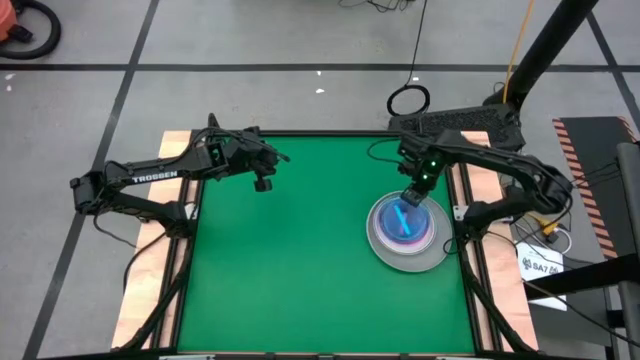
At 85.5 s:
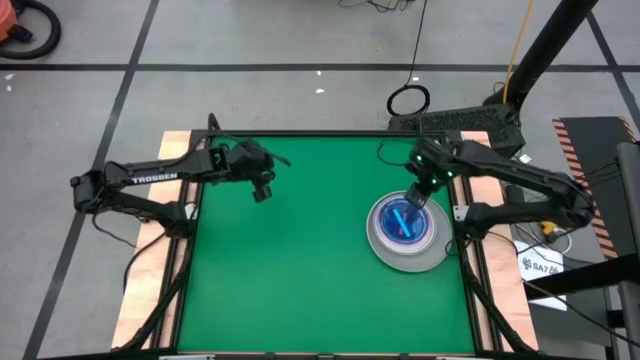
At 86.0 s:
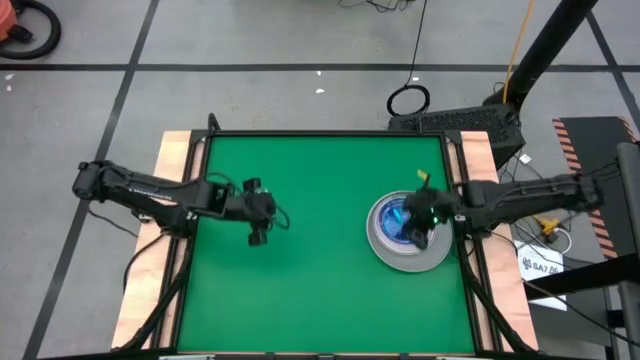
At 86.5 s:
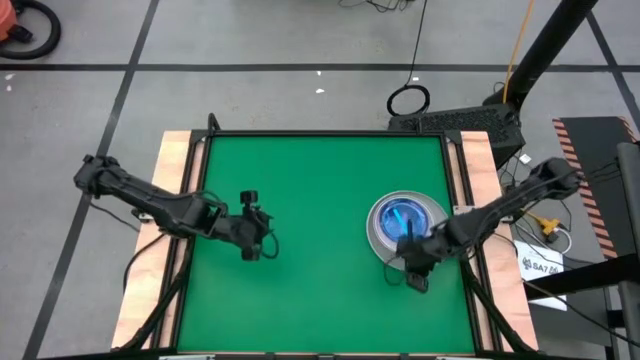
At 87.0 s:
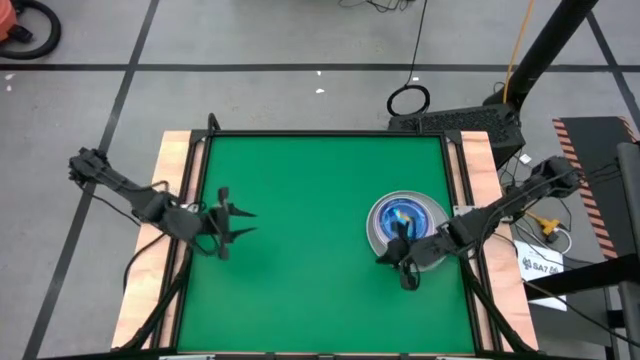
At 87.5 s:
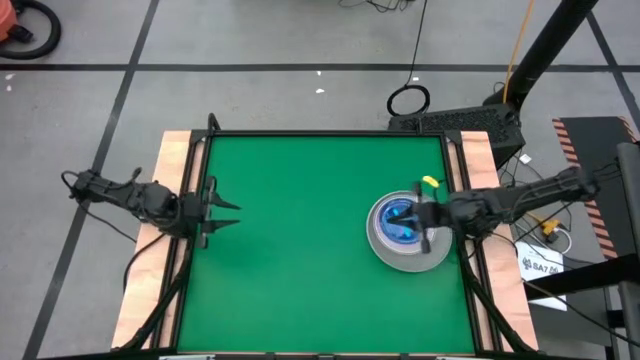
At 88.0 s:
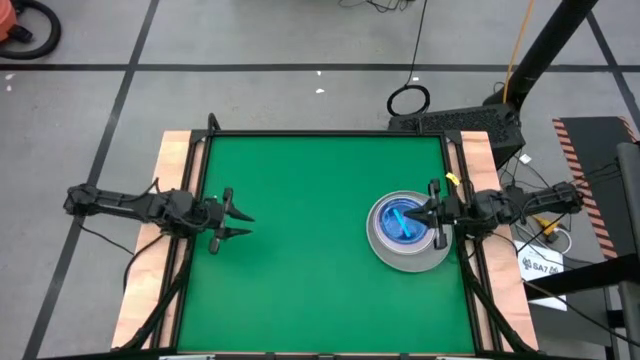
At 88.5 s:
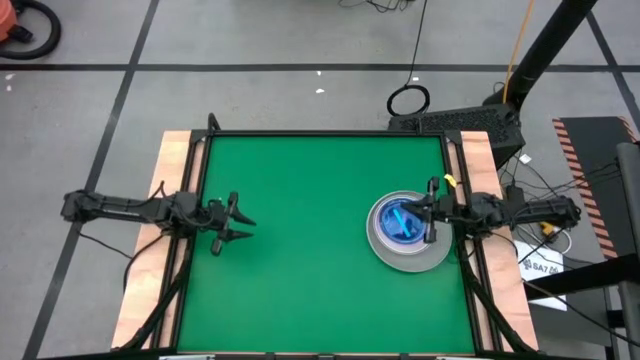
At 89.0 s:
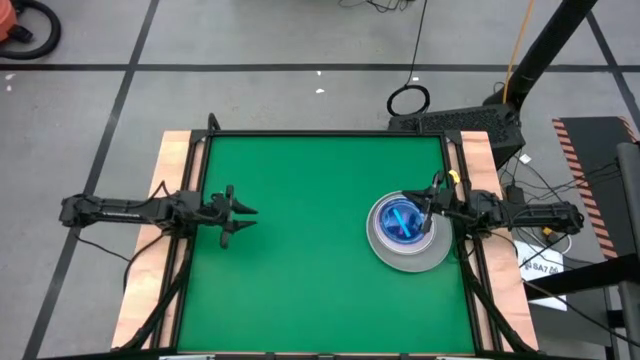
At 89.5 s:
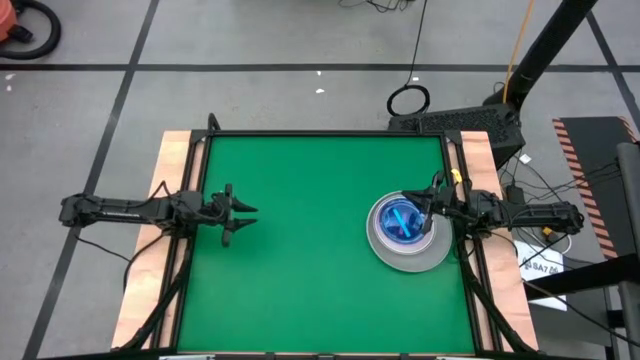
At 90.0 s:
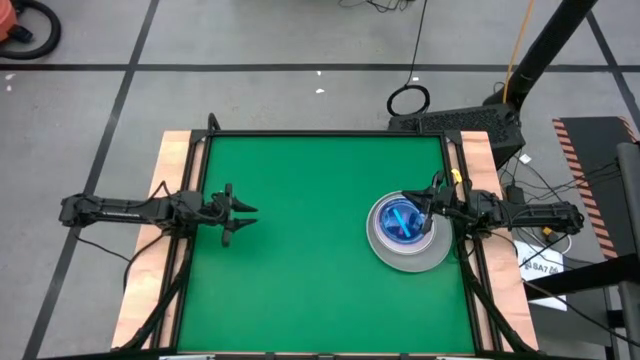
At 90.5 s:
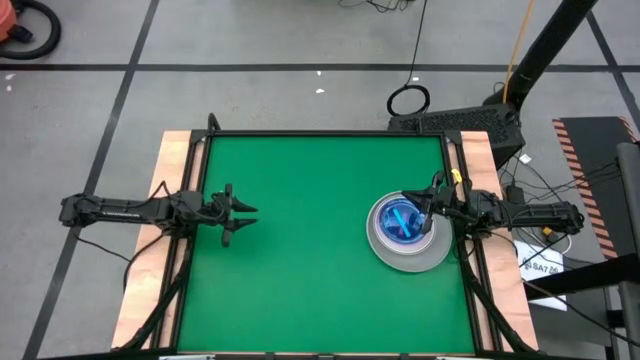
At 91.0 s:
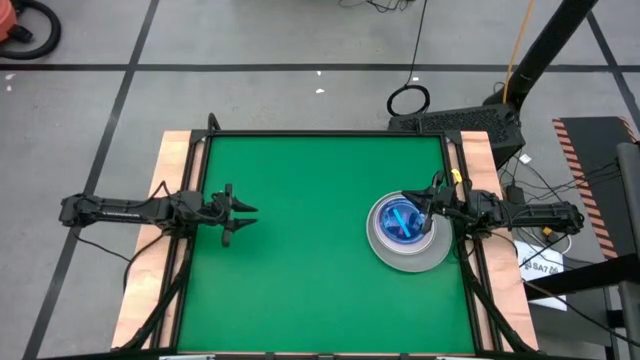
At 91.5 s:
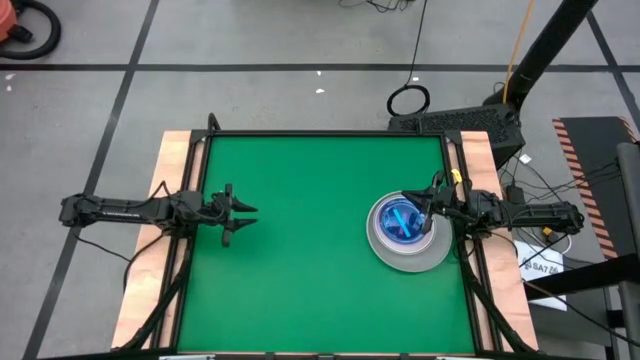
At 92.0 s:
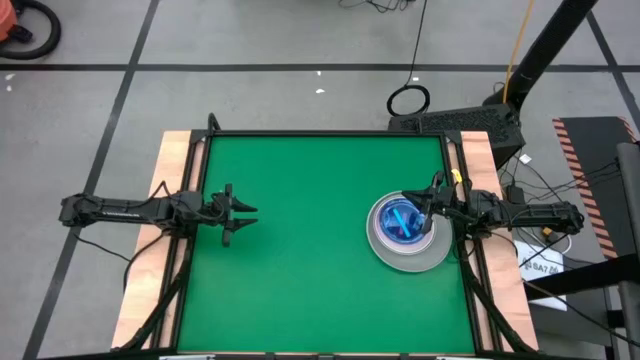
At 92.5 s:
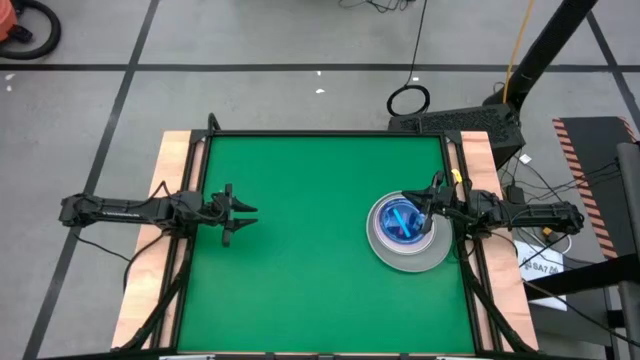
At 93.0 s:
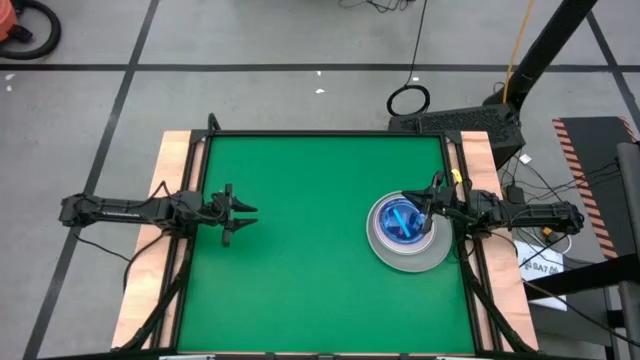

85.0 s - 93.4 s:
Task: Stack plastic plates
Return to Home Position

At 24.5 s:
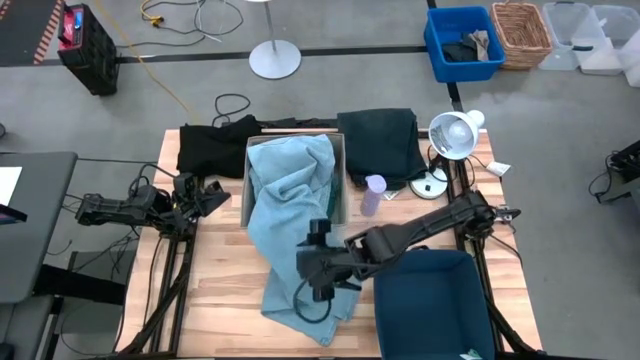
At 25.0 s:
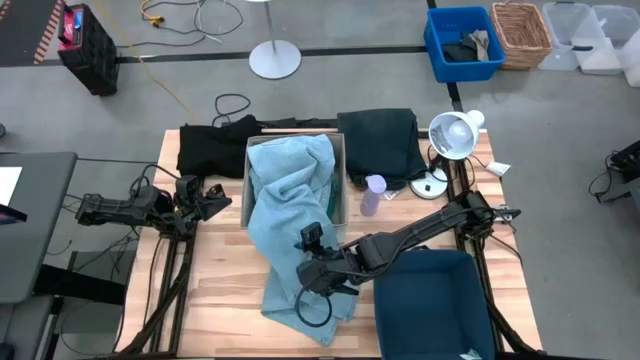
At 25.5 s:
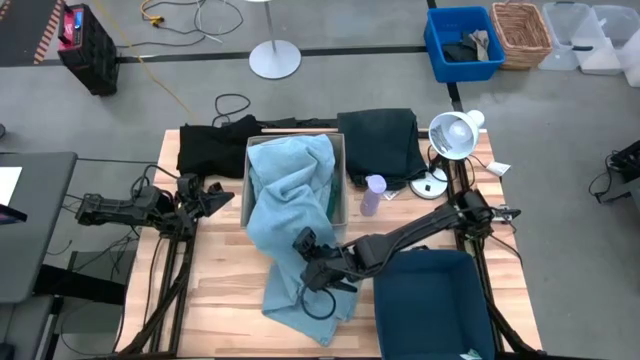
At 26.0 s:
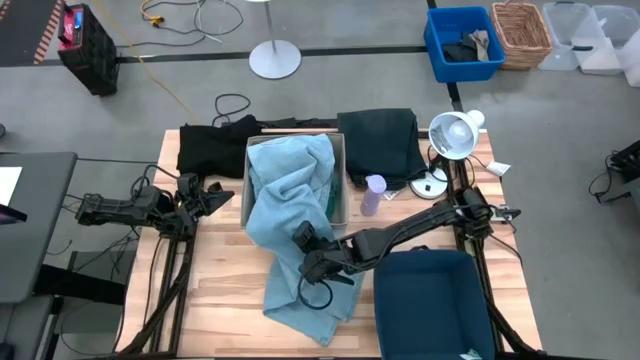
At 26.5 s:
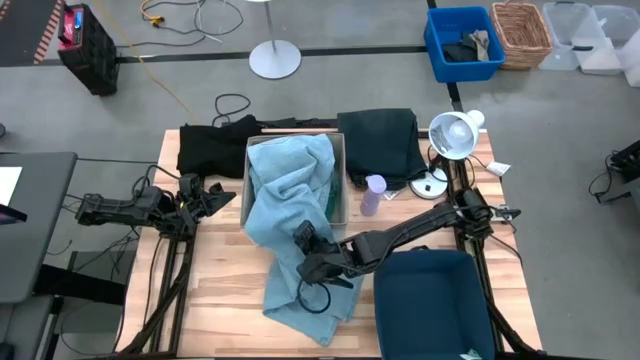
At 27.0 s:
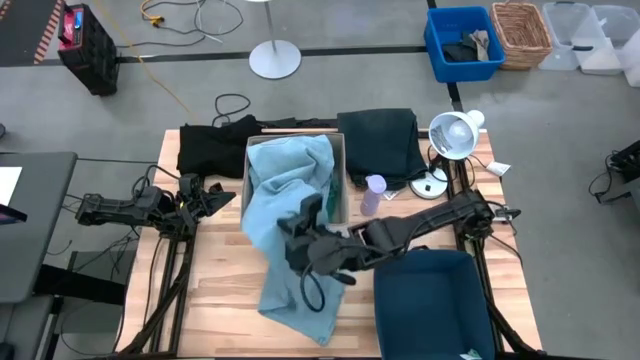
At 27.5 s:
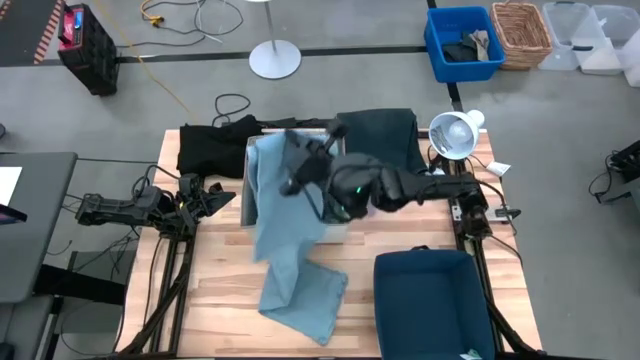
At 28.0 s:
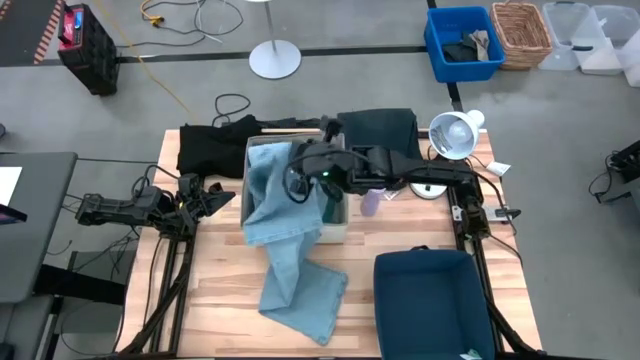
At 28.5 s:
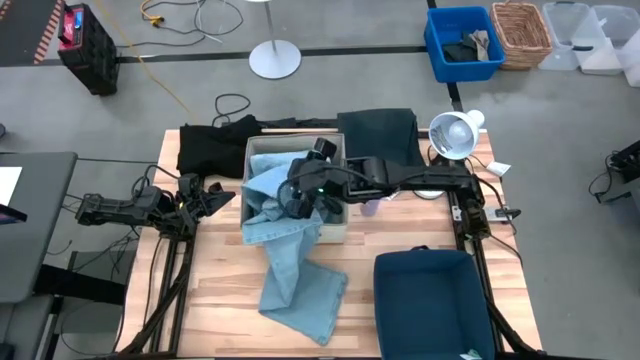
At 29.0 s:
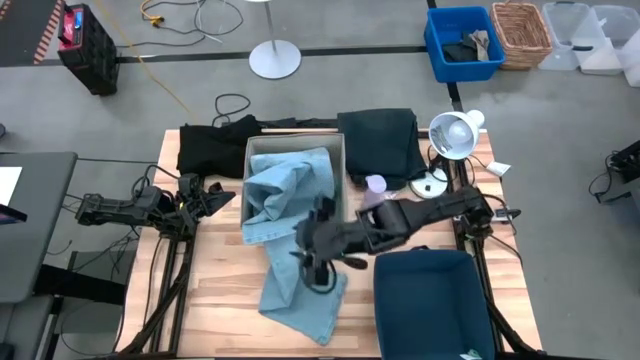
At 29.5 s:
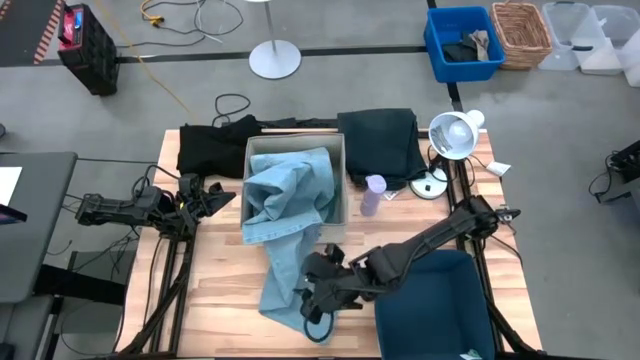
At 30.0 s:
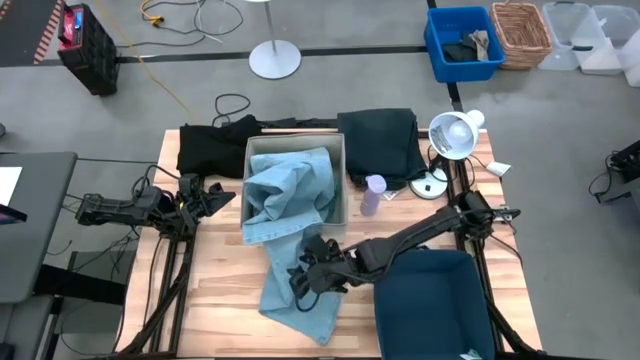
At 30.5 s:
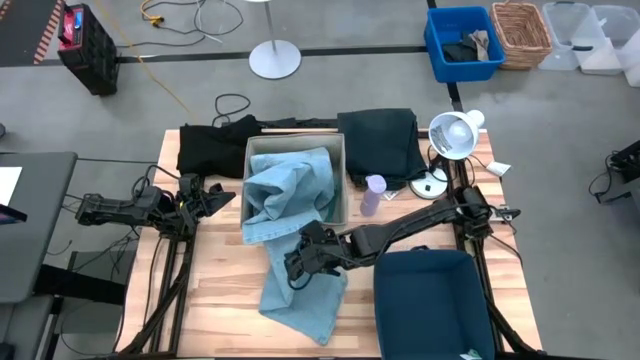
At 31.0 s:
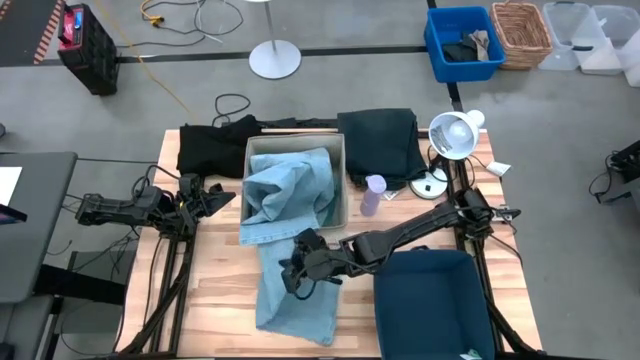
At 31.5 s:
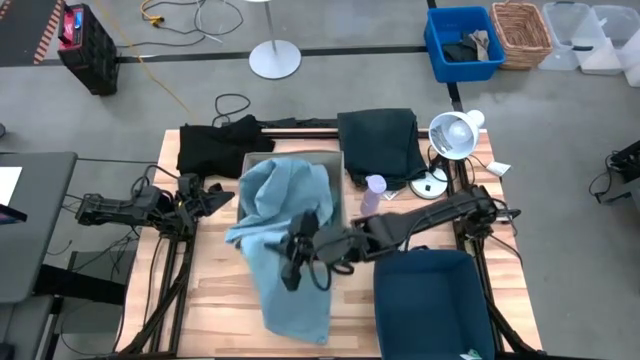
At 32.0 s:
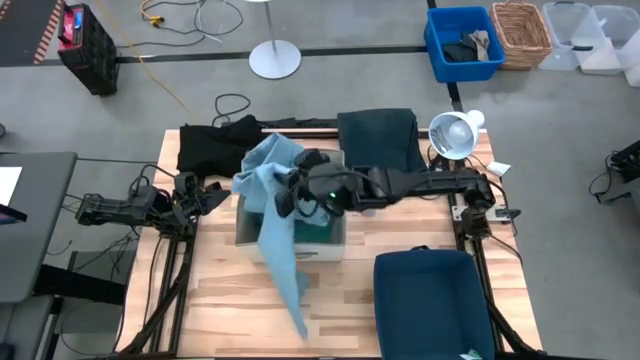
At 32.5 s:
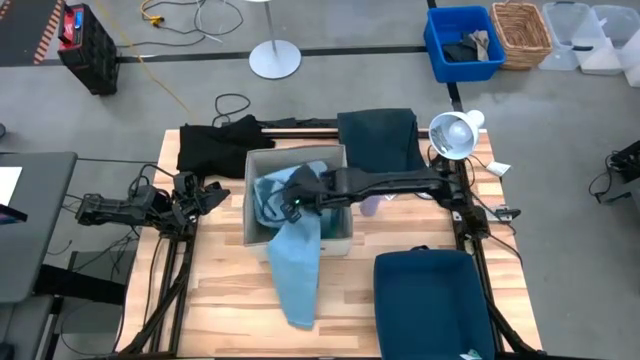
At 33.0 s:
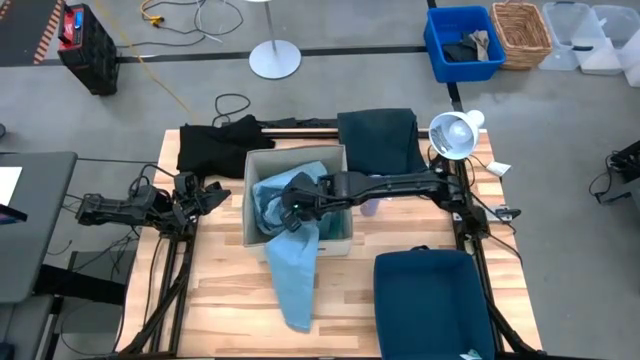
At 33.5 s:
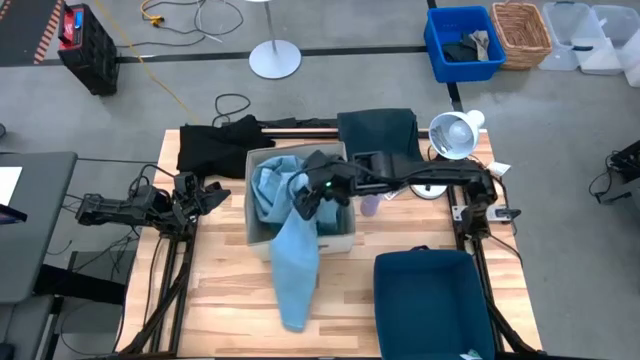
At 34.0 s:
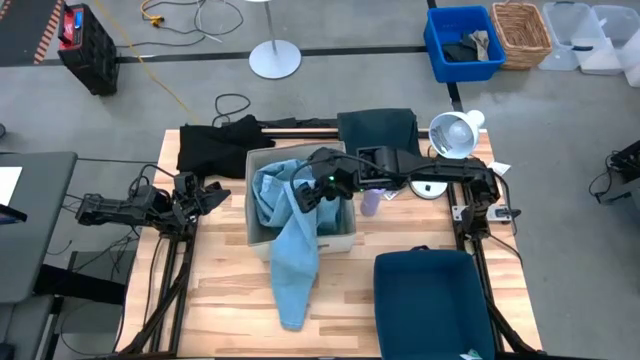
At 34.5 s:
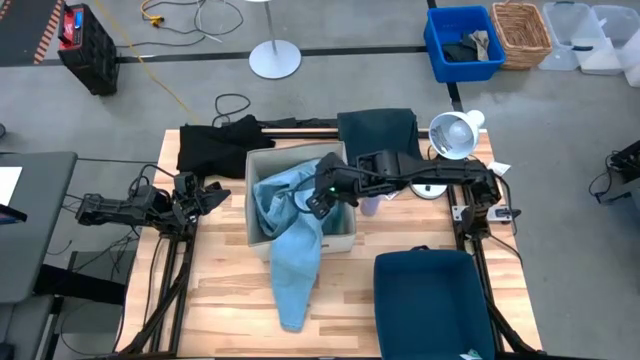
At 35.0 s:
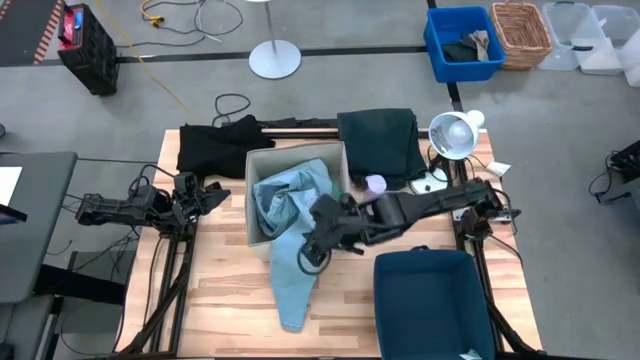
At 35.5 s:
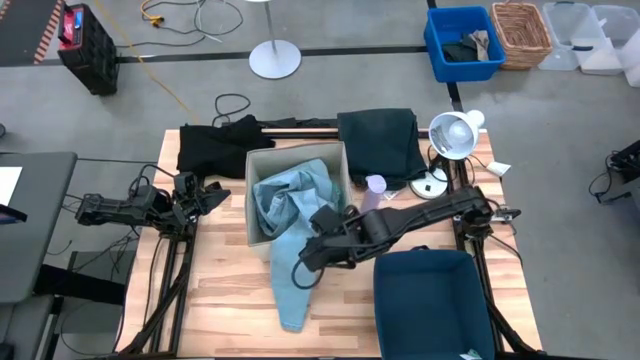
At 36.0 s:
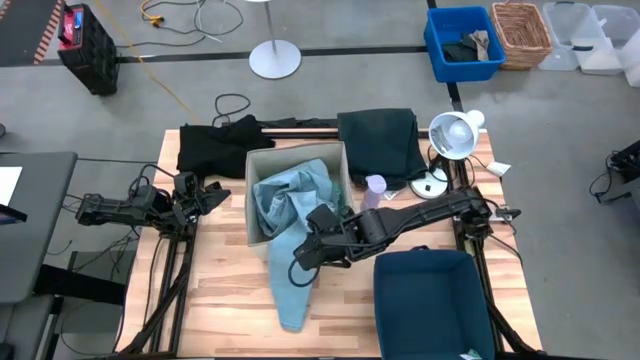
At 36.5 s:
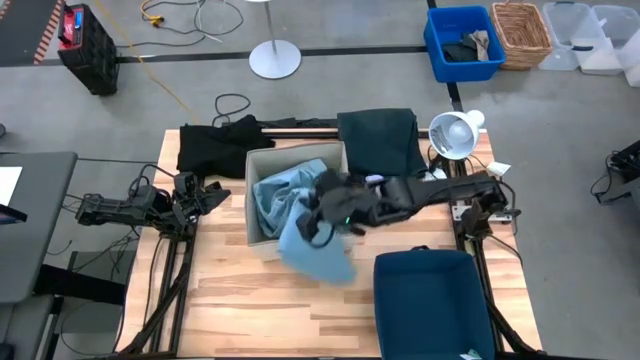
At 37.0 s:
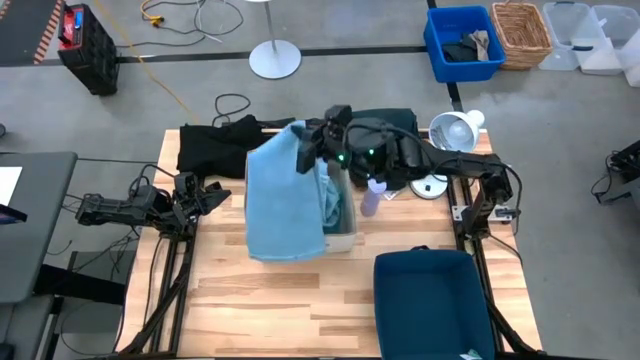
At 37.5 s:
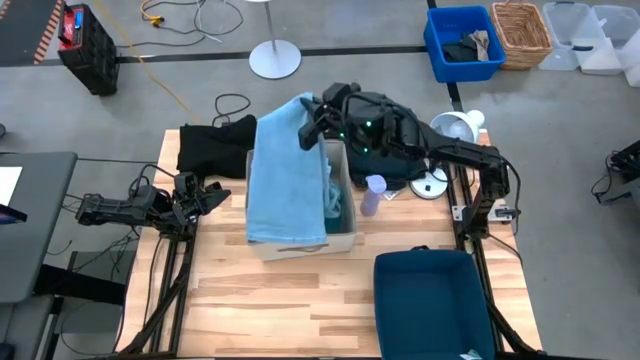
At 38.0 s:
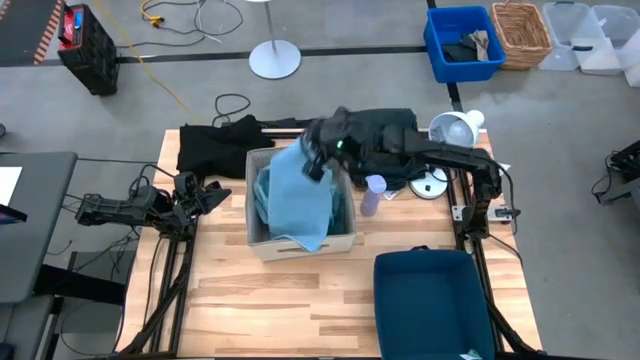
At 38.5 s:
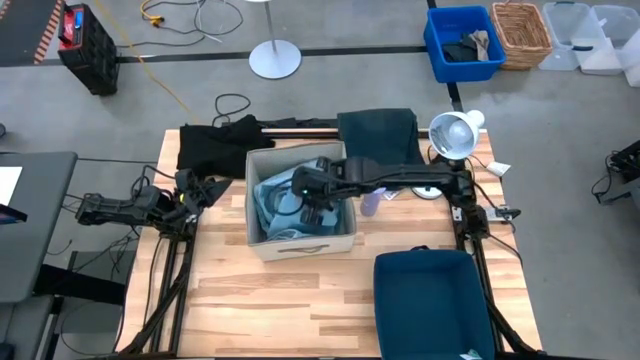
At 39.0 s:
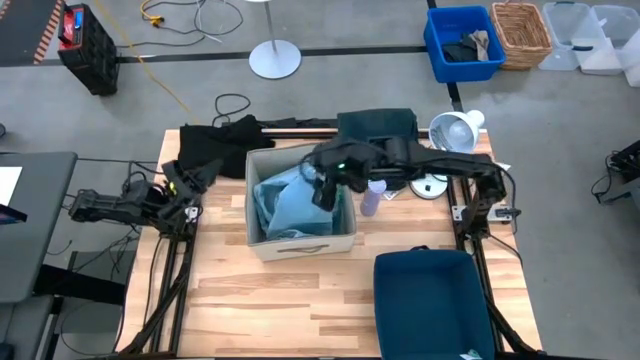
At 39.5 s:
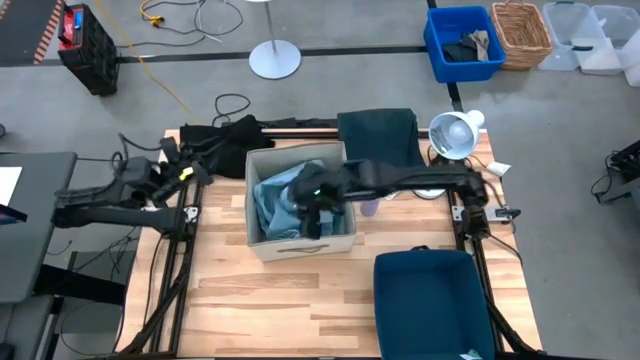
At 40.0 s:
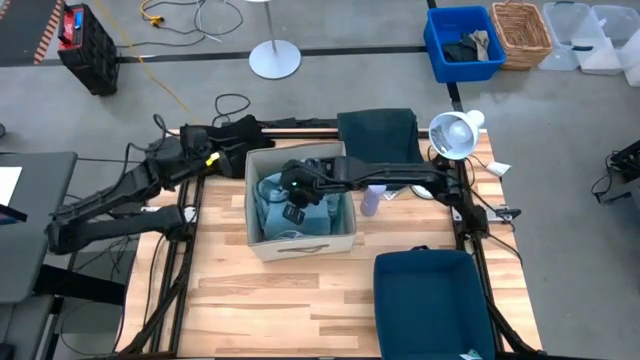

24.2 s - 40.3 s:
Task: Sort clothes
Put the blue pants into the laundry organizer
